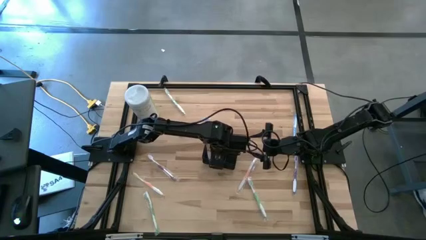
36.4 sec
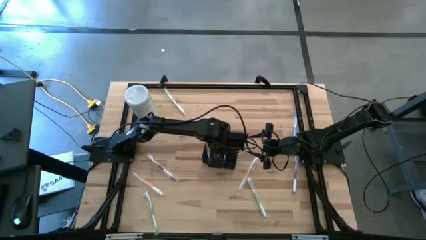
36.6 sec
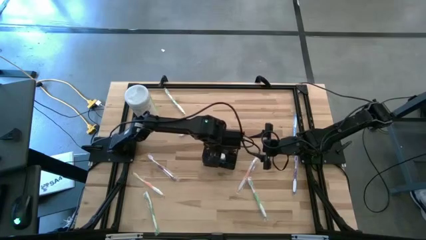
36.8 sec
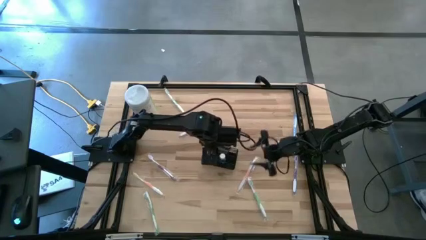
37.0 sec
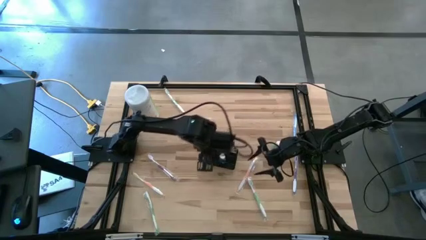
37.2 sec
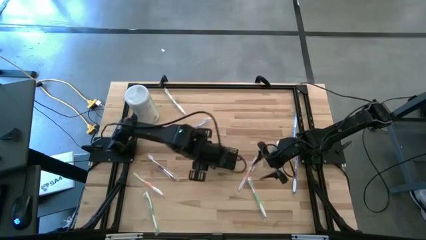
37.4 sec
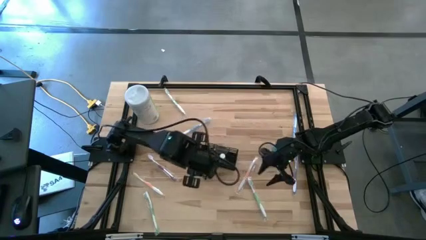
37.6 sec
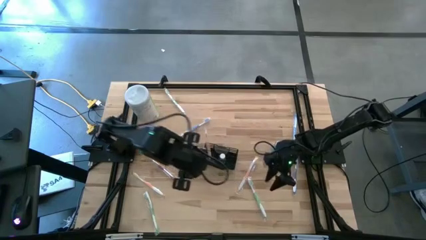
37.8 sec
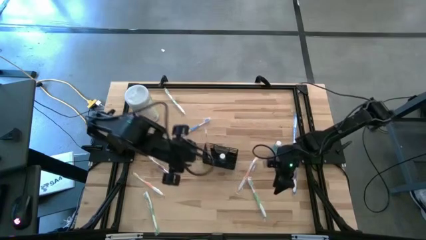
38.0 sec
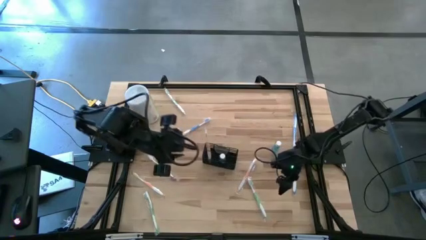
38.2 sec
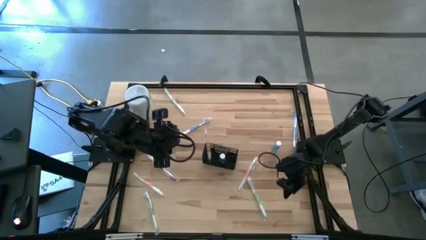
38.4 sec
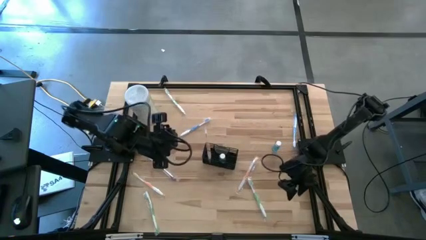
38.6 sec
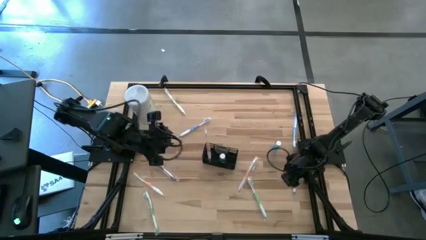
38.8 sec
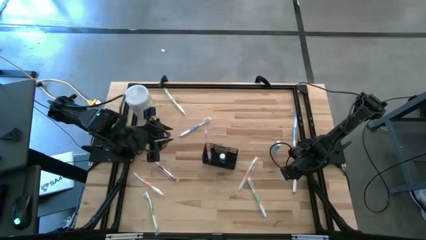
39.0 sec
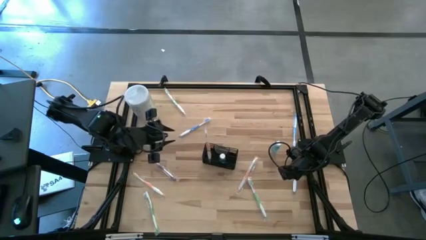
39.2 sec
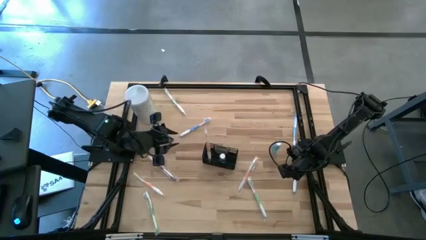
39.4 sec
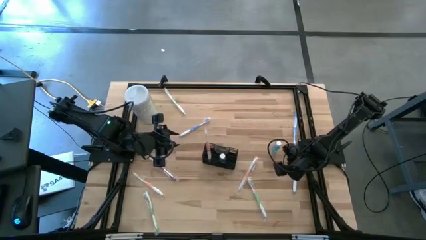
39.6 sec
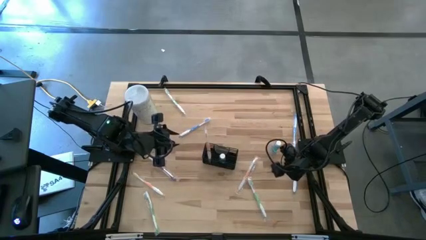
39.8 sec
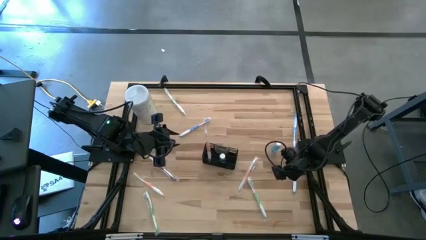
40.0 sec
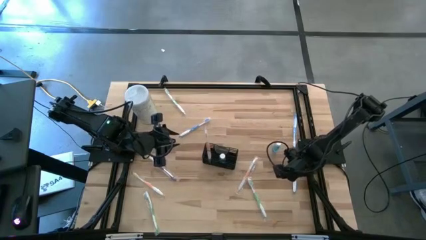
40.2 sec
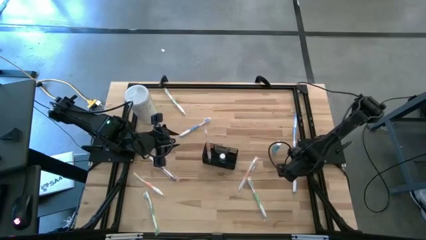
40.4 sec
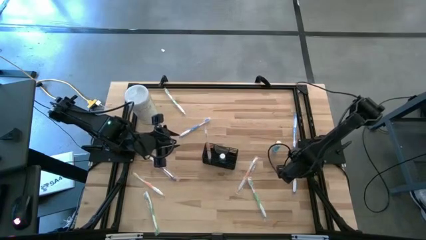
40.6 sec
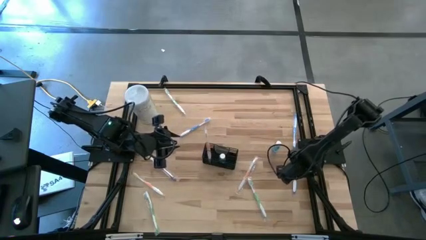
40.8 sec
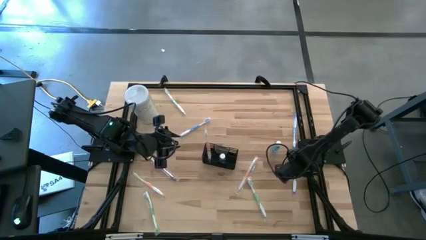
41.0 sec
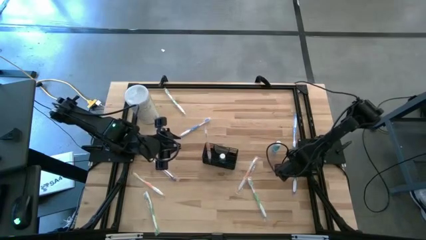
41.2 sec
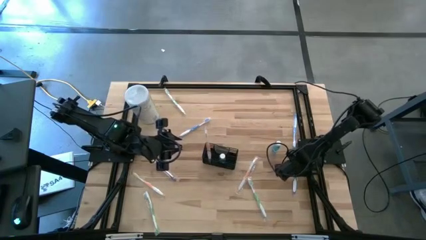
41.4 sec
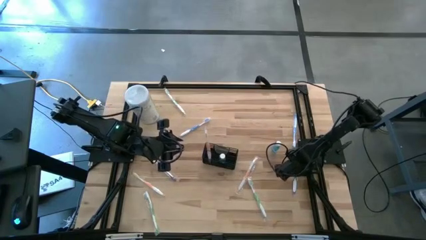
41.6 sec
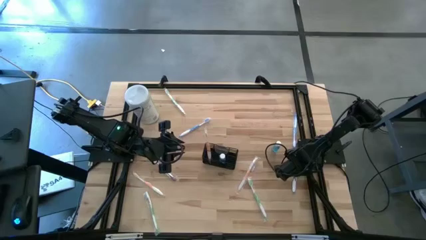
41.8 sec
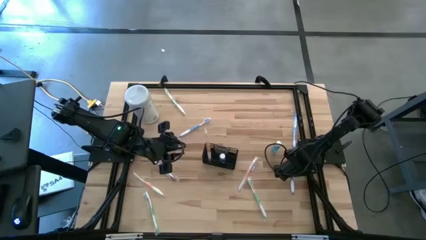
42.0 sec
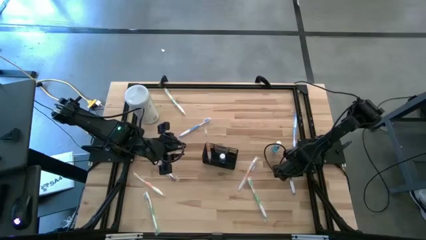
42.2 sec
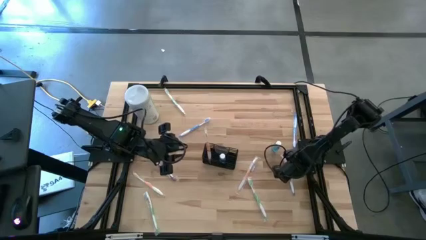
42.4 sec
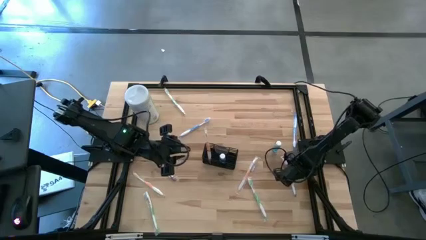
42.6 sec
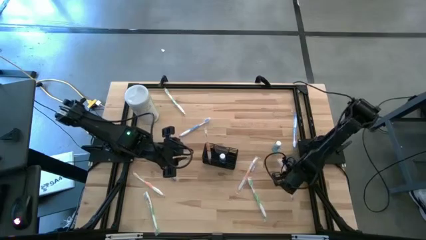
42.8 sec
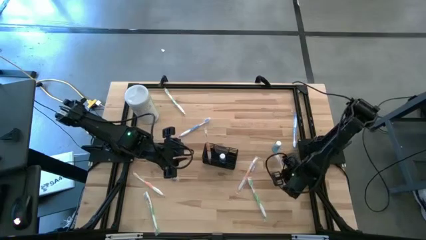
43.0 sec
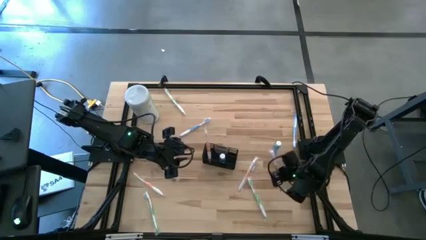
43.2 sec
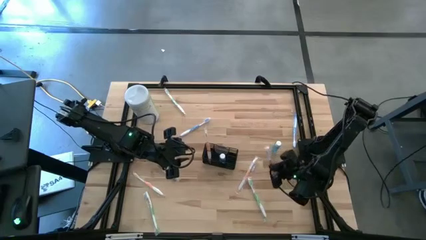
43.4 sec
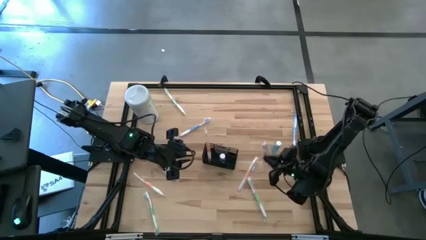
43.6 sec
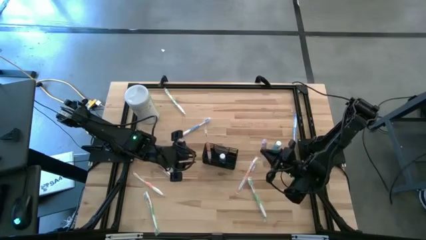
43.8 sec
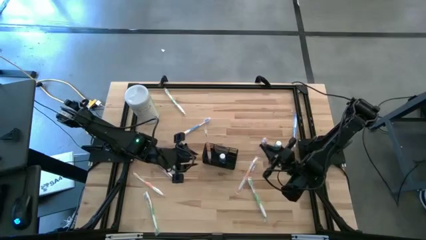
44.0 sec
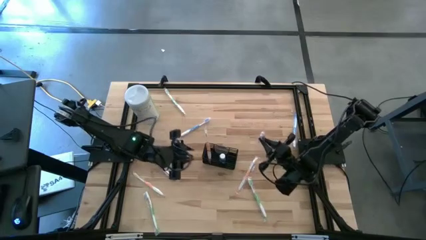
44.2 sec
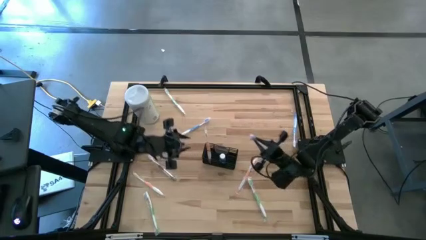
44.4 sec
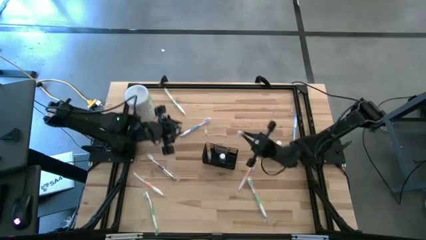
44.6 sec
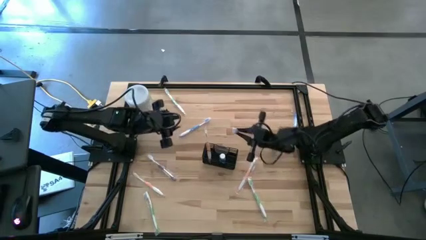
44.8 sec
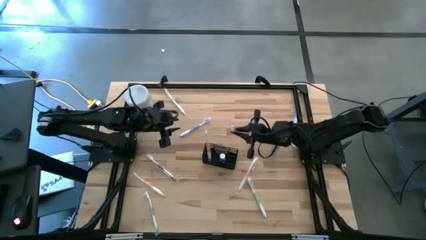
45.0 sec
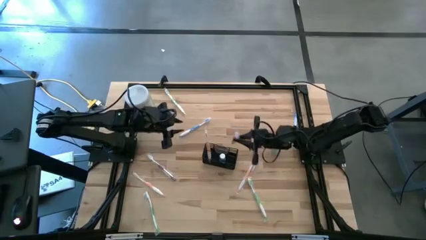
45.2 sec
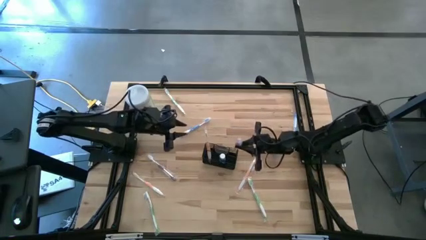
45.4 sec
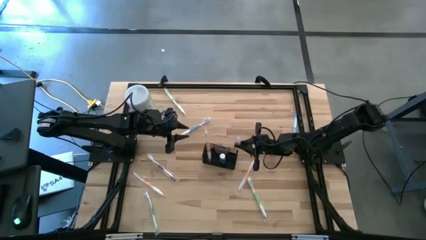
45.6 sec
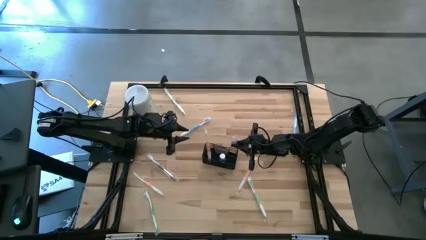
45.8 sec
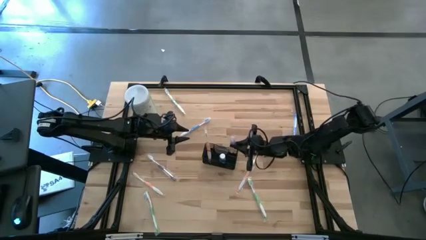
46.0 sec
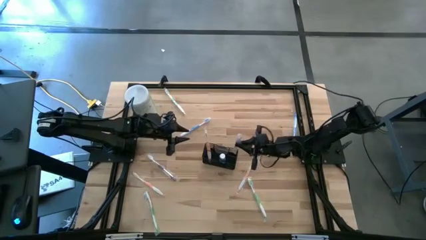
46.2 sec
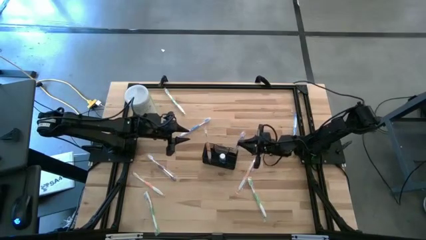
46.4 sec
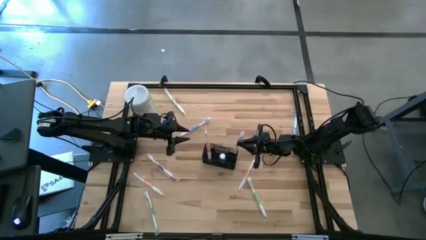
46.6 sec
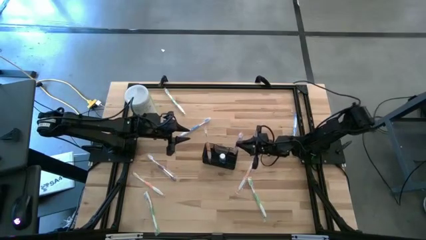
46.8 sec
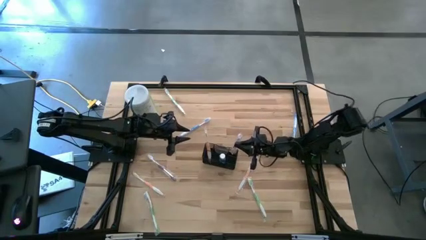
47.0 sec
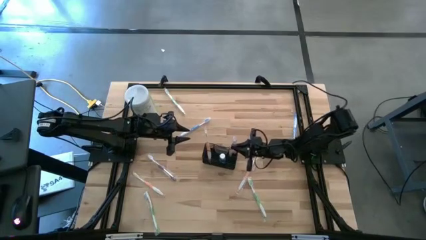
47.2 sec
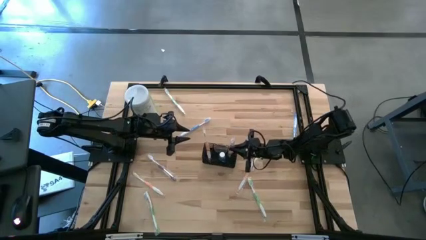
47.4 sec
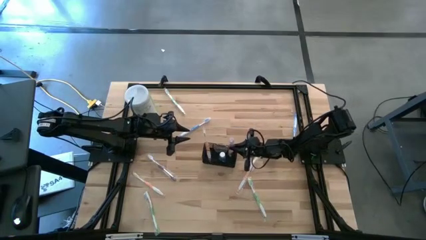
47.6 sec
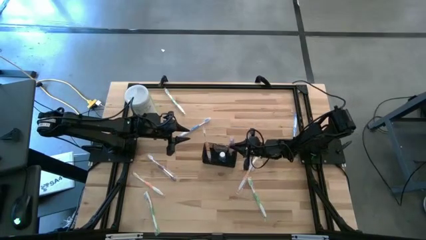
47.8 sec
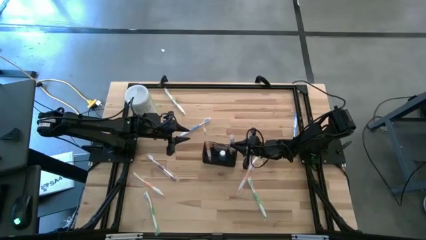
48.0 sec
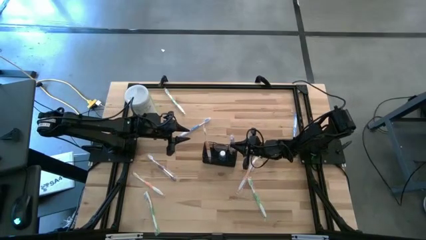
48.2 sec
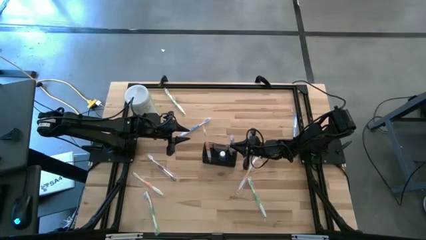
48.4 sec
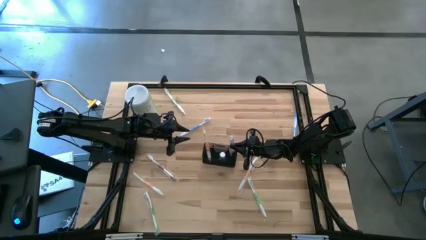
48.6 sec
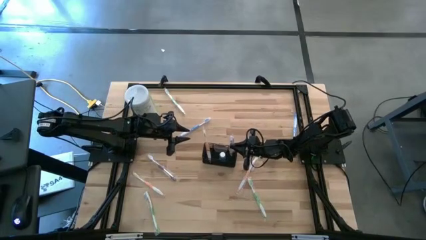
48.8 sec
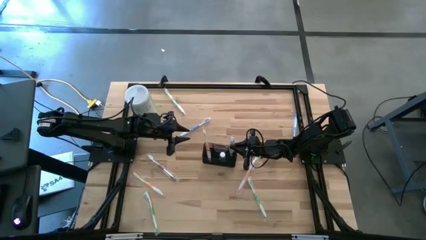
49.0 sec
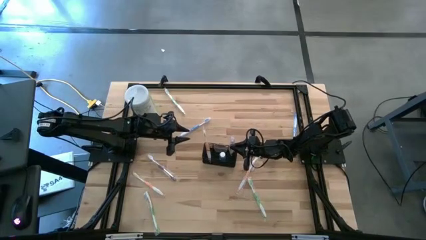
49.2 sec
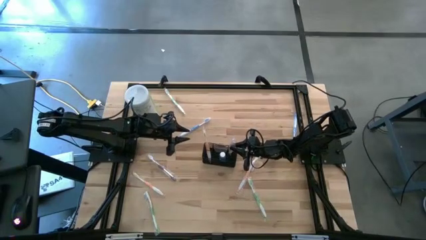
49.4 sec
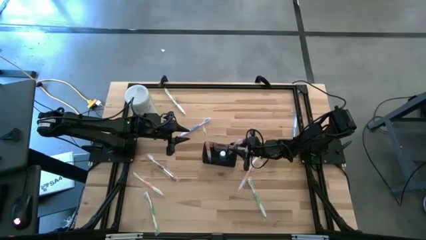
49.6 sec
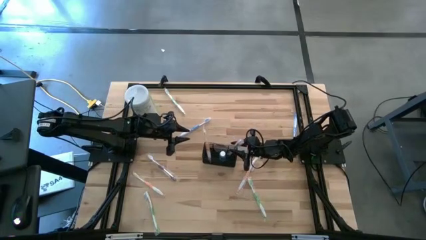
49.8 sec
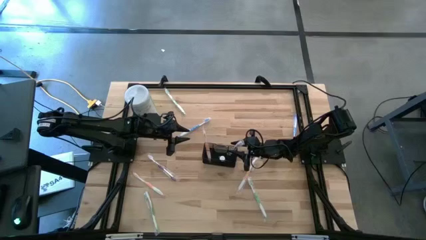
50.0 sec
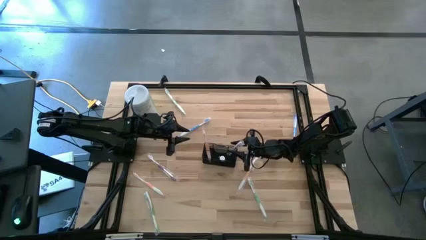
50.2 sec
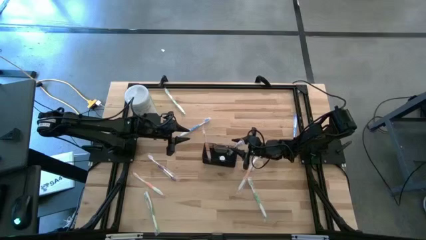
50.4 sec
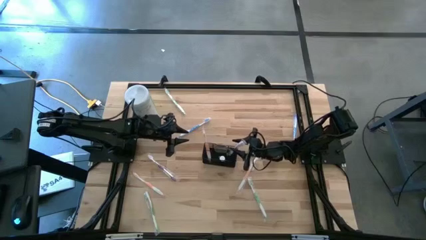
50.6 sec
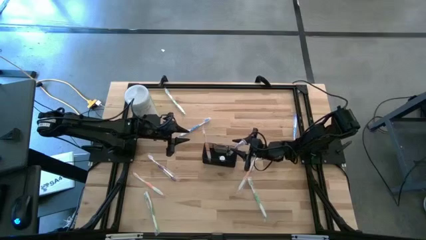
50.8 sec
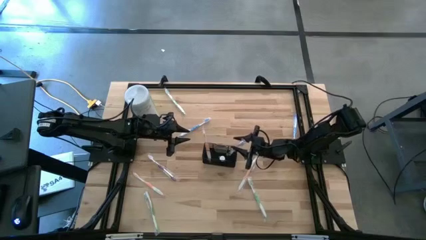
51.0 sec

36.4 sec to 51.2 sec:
Task: Pick & Place toothbrushing station
Put the right purple toothbrush into the mesh organizer
